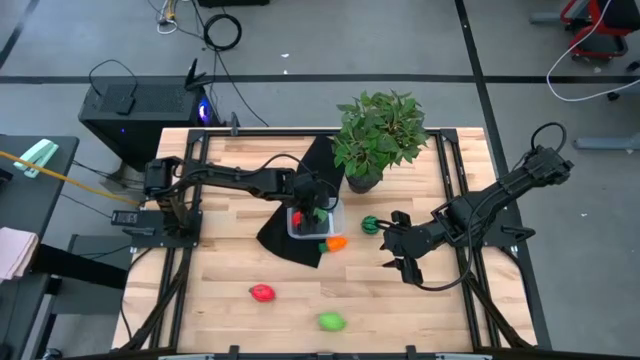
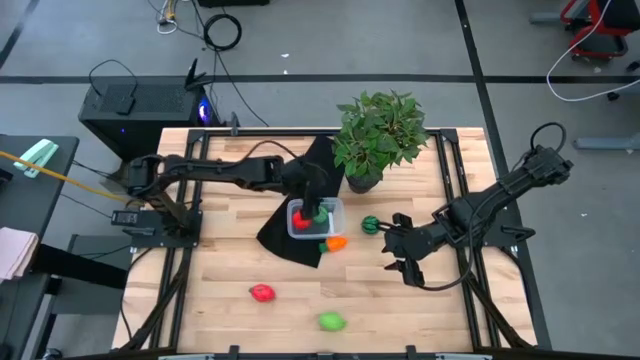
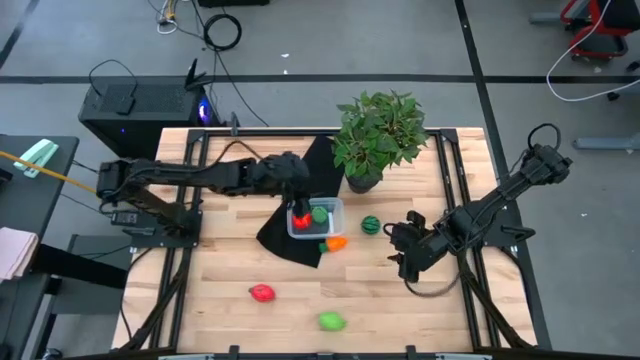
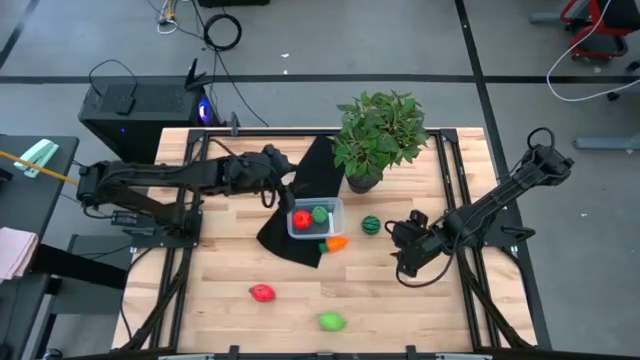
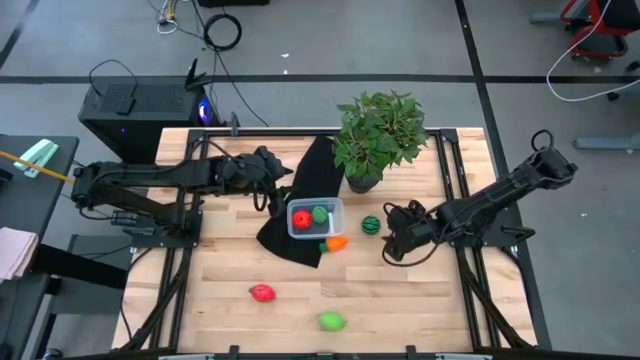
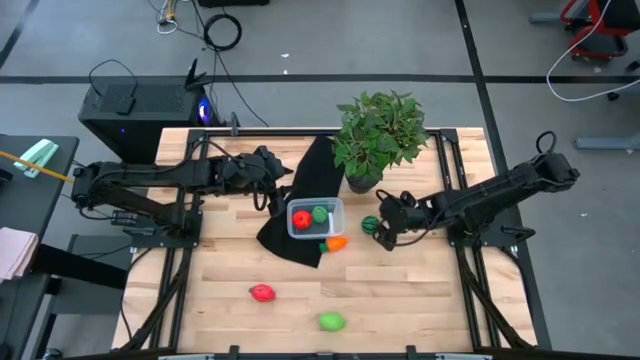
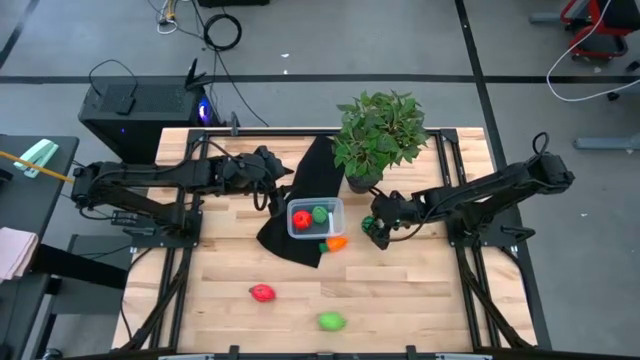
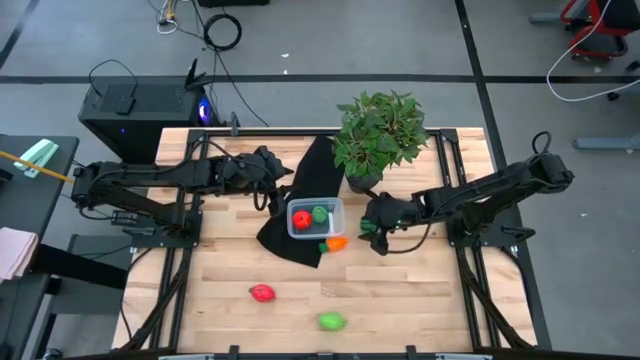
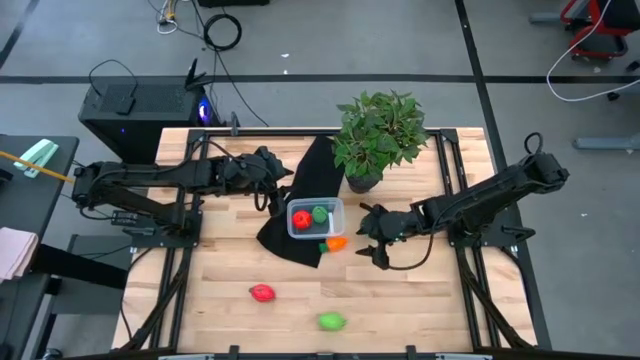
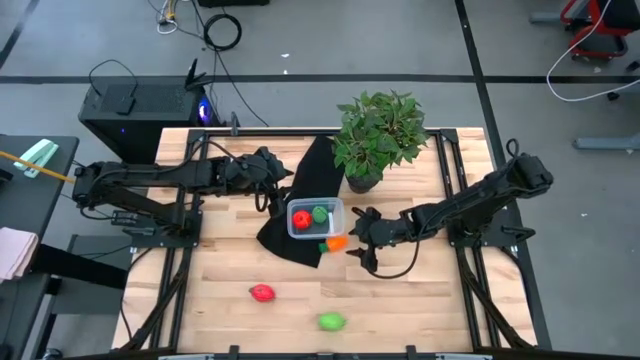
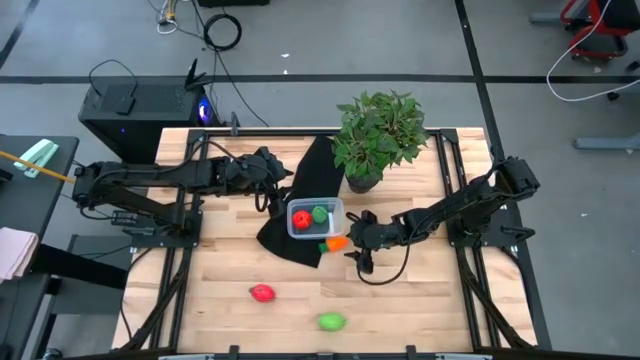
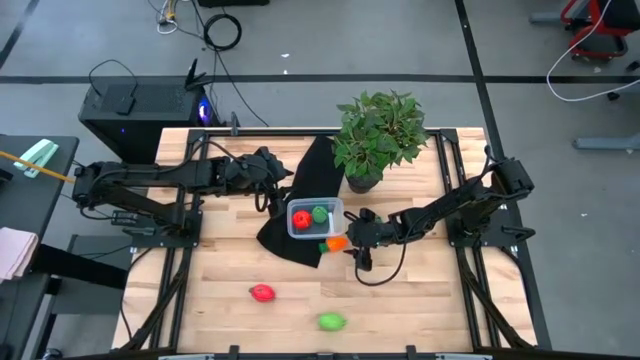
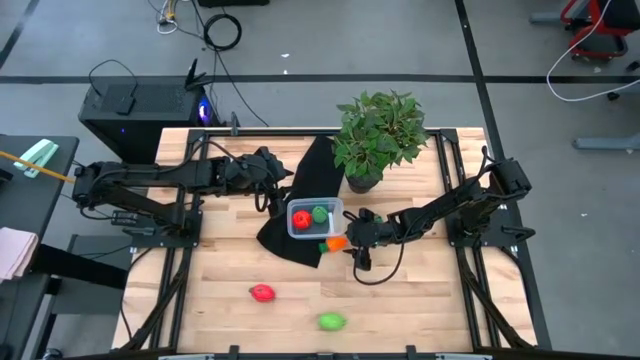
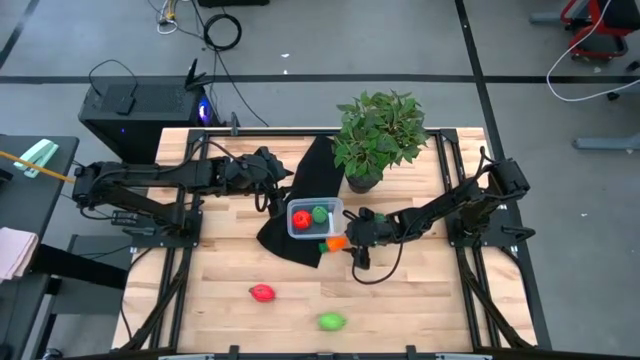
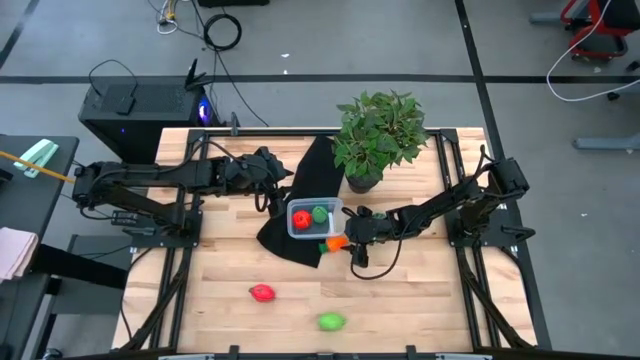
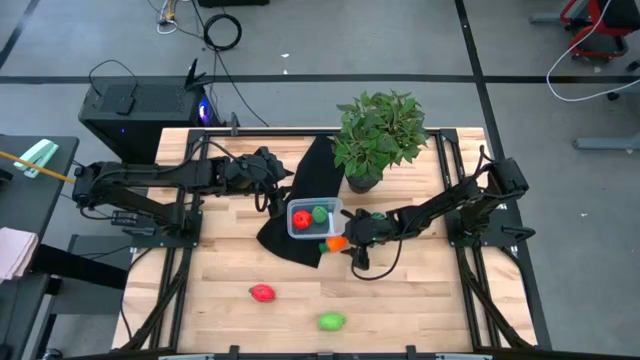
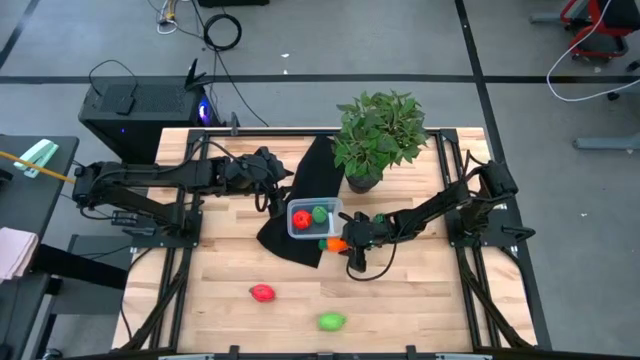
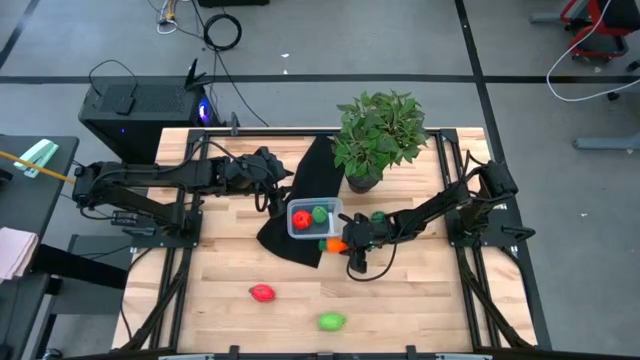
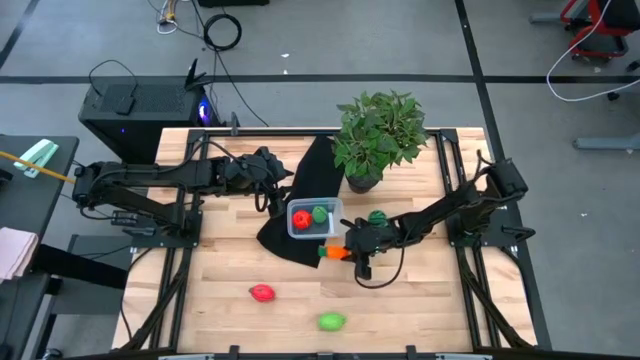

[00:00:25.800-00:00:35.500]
Task: Pick and placing Produce into tupperware
Put the orange carrot into the bin

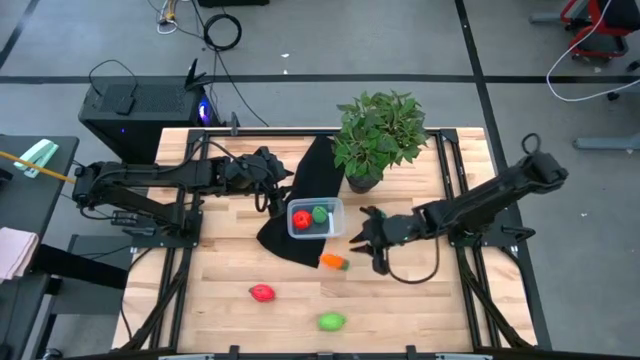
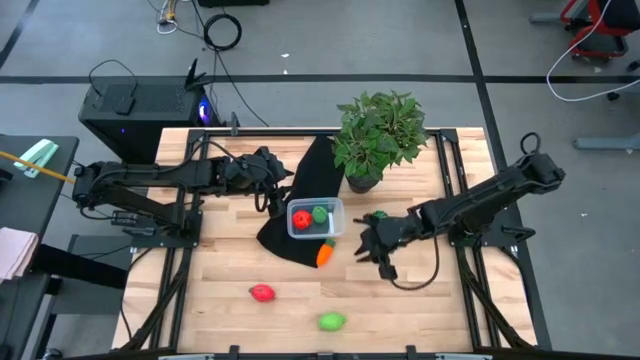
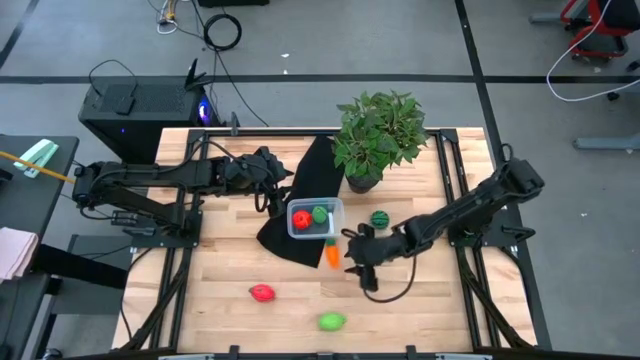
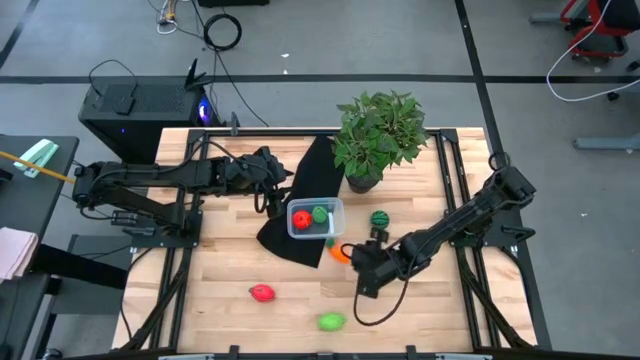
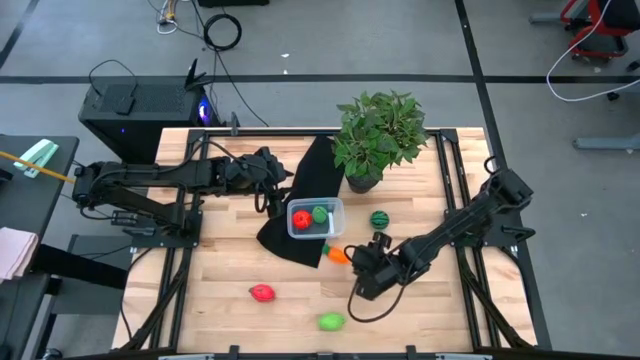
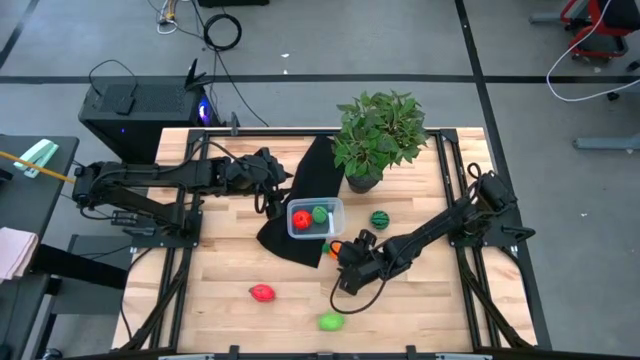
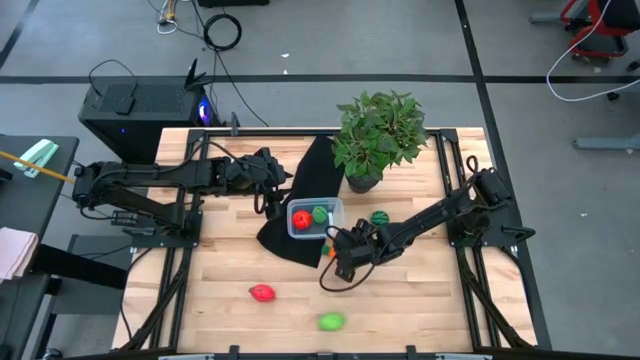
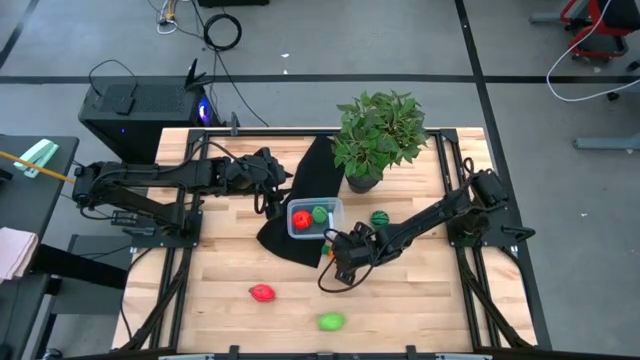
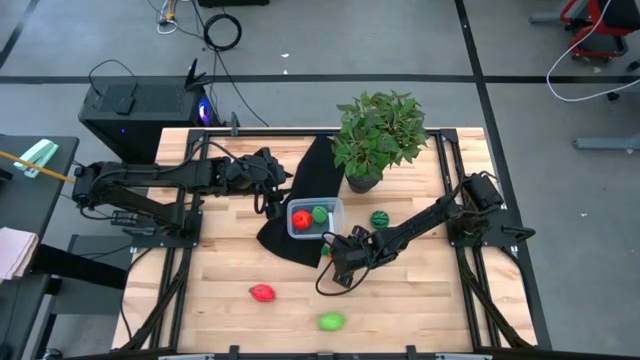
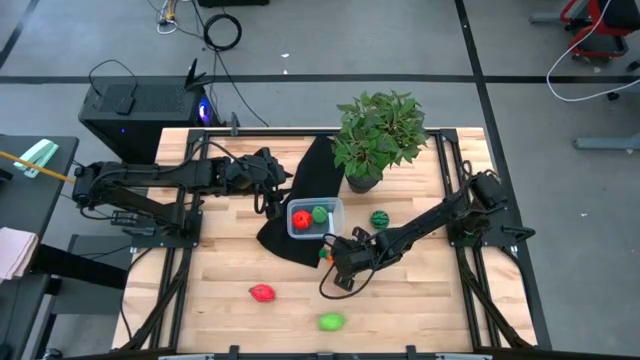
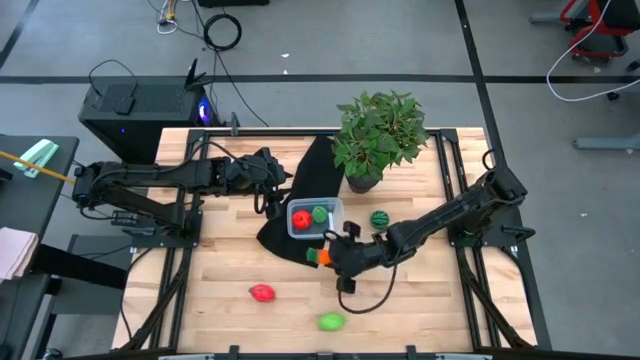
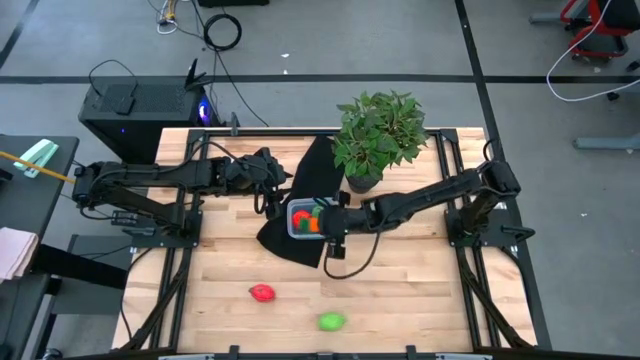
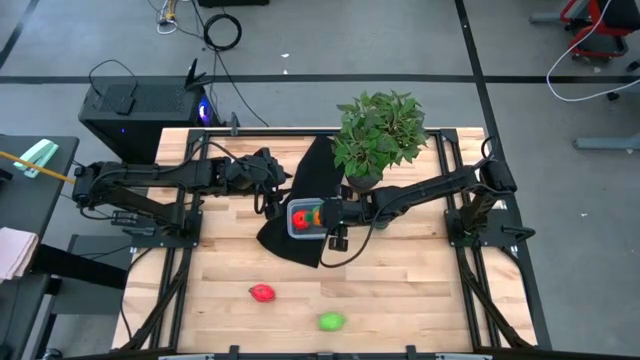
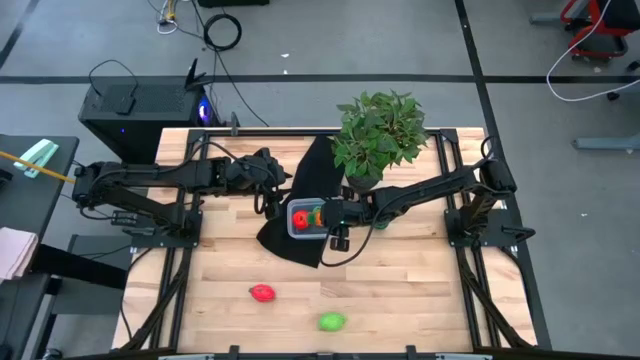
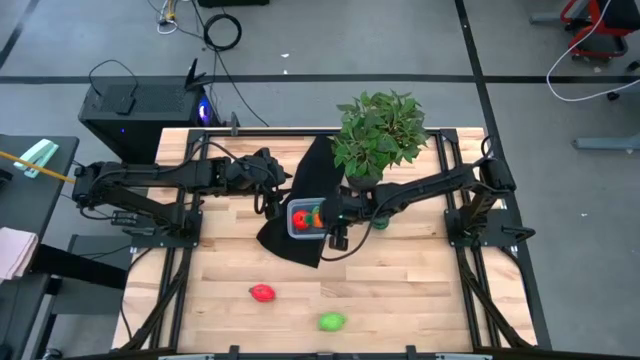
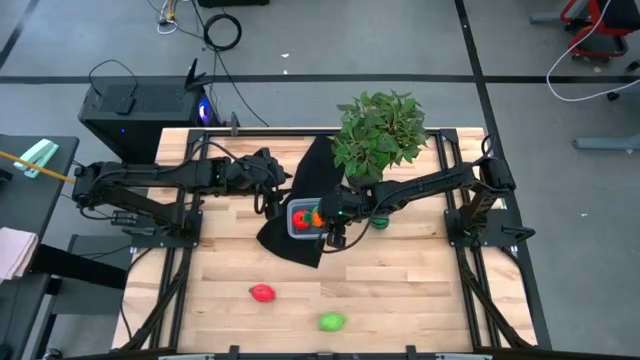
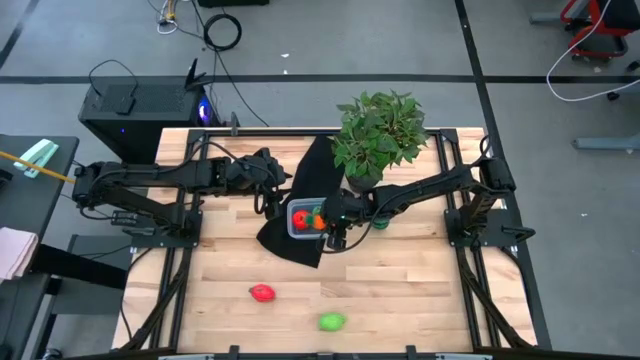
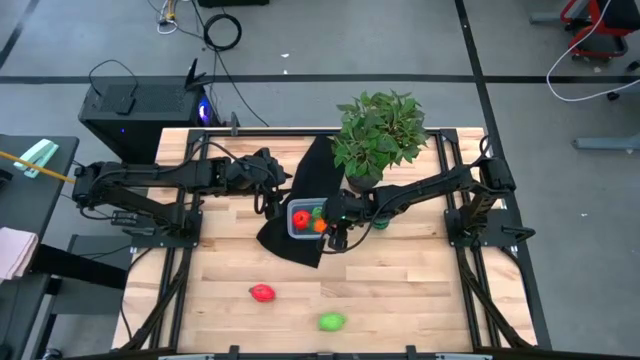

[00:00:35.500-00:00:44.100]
Put the orange carrot into the bin

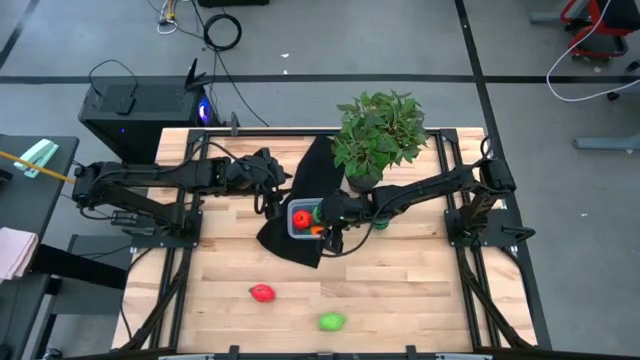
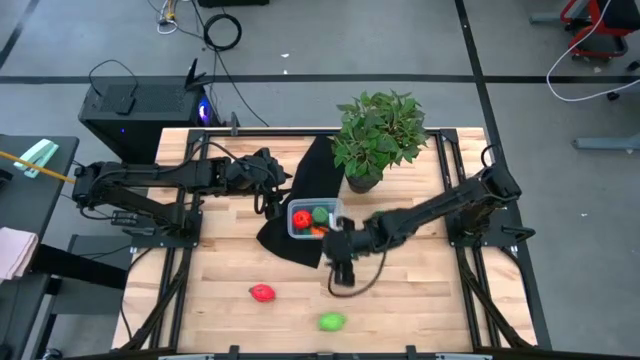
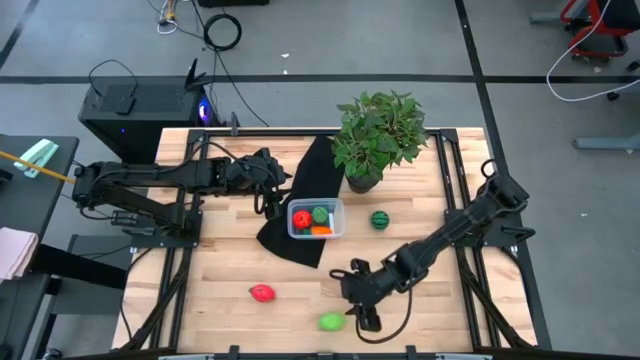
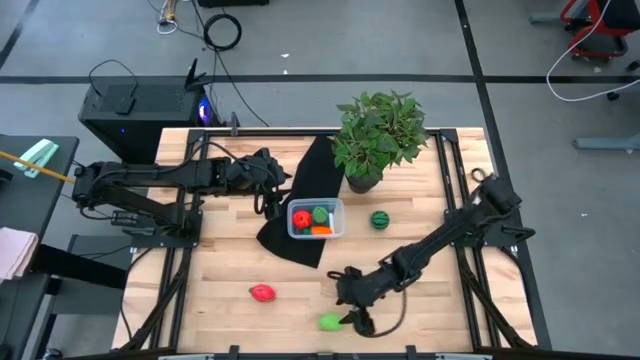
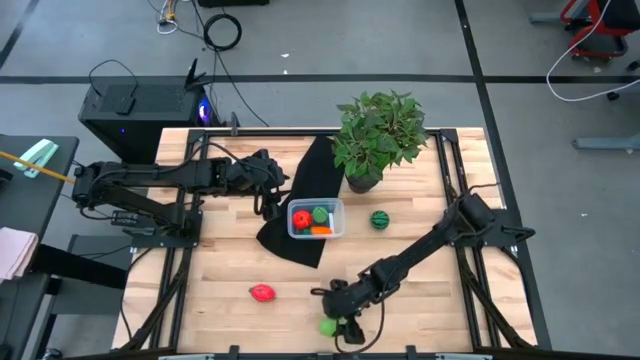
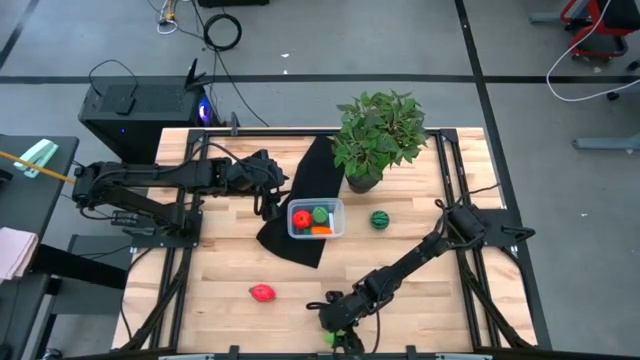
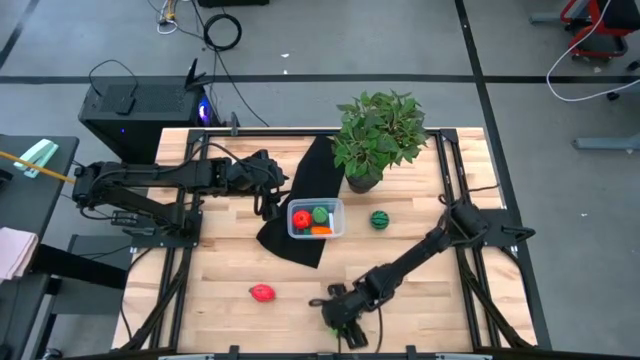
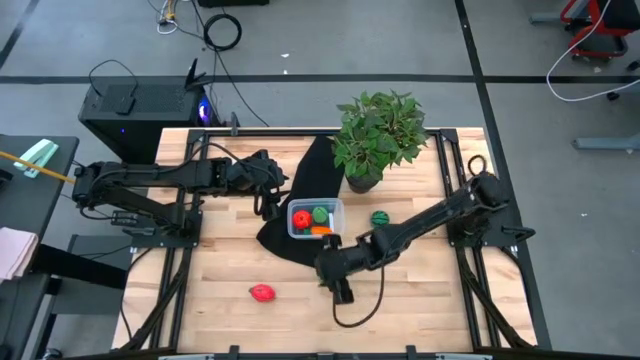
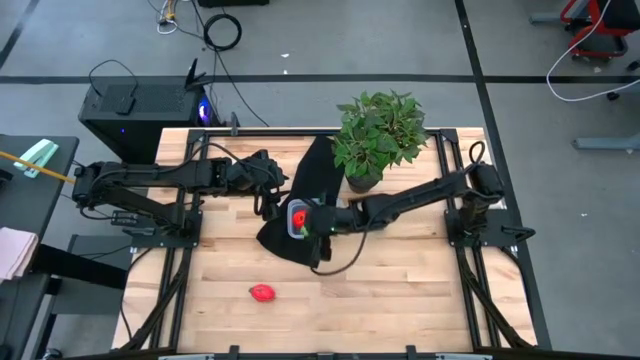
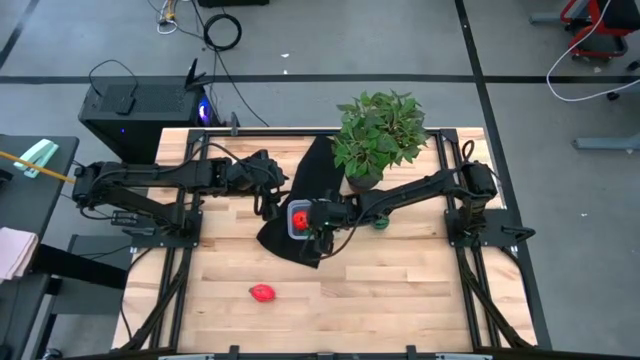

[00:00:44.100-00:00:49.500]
Put the green lime in the bin
